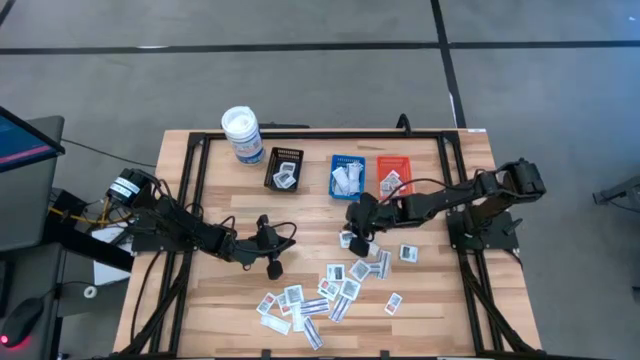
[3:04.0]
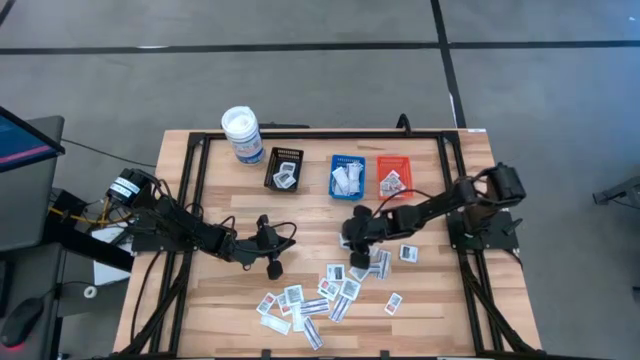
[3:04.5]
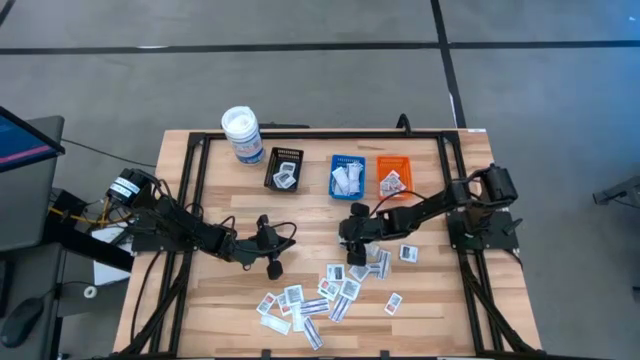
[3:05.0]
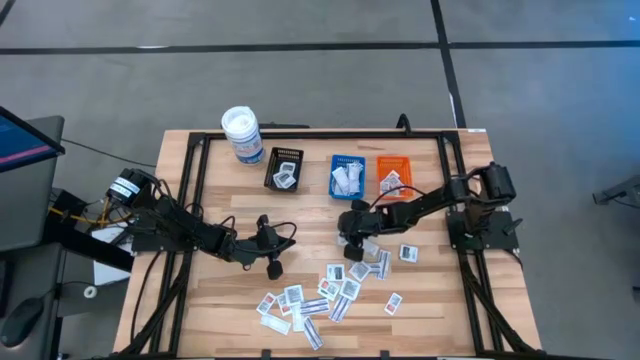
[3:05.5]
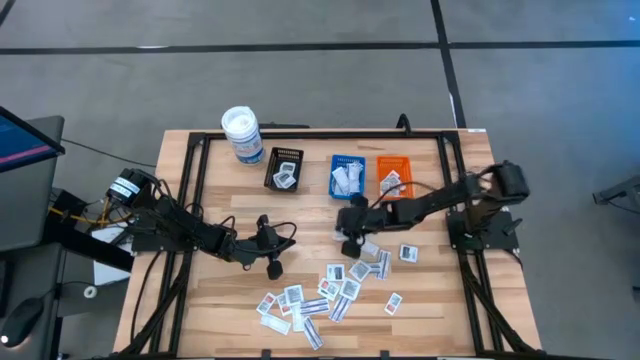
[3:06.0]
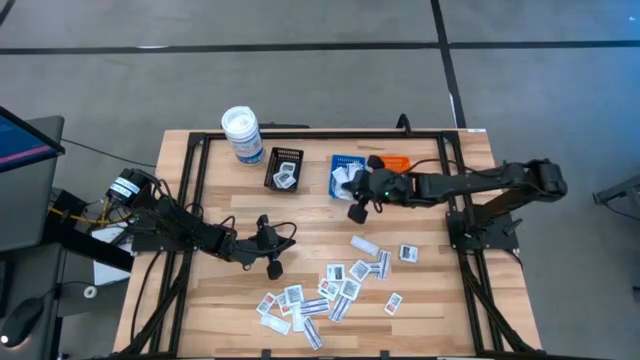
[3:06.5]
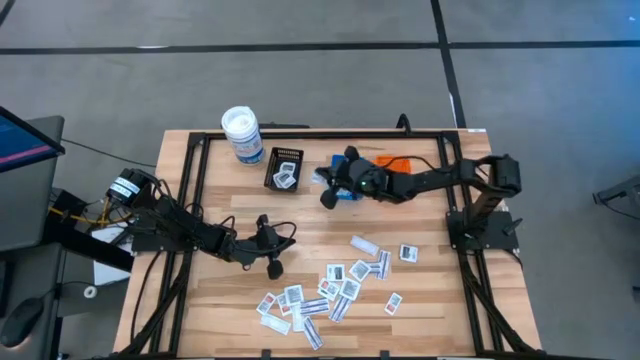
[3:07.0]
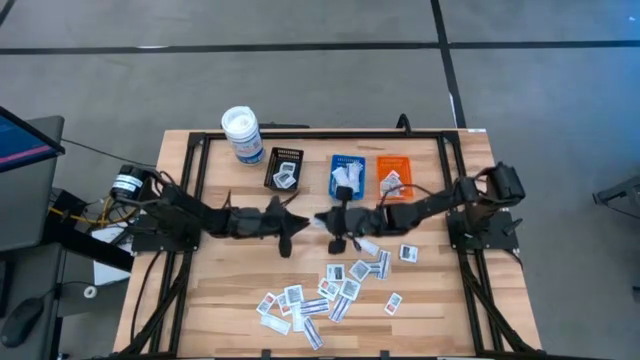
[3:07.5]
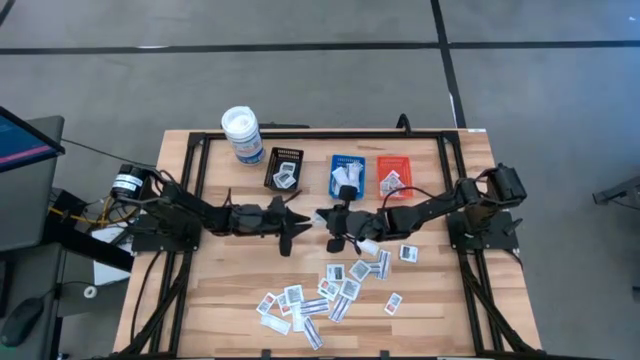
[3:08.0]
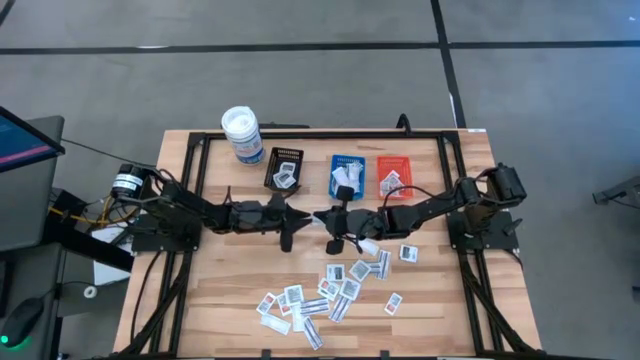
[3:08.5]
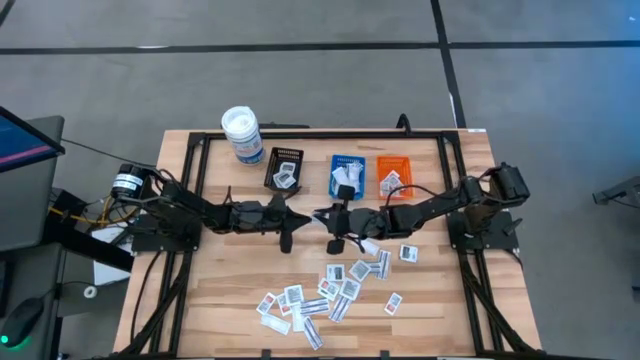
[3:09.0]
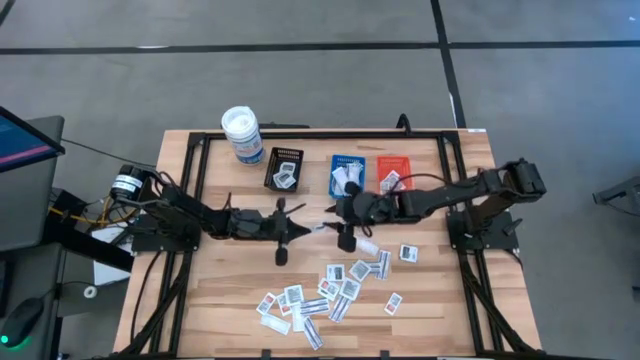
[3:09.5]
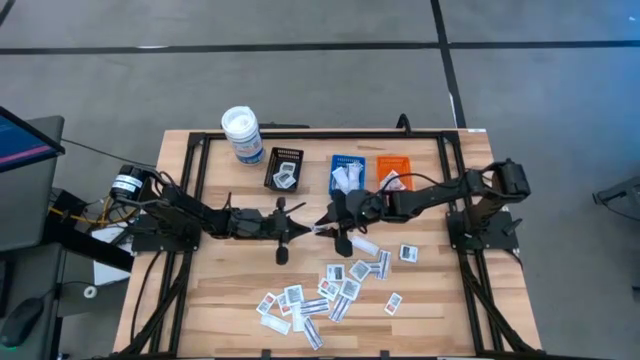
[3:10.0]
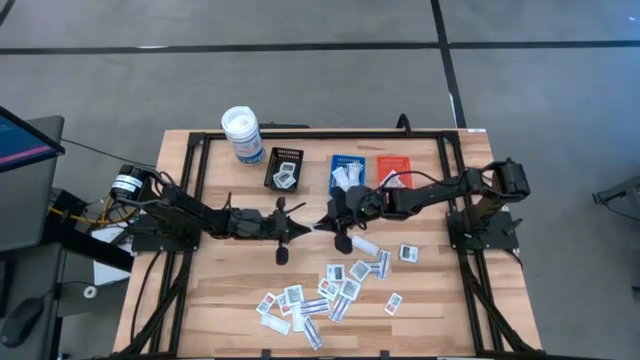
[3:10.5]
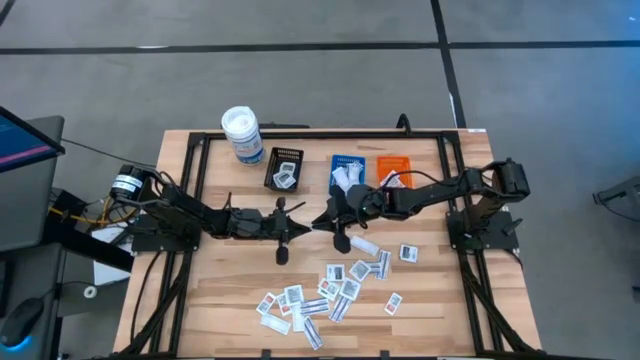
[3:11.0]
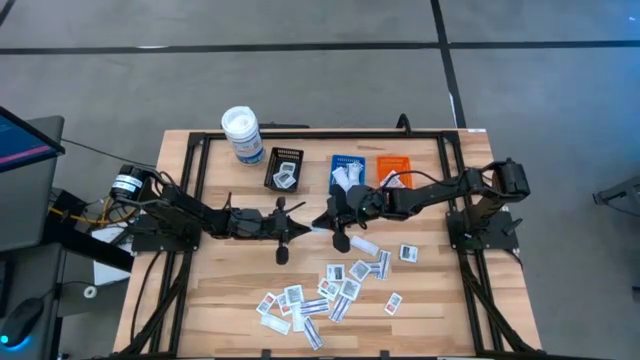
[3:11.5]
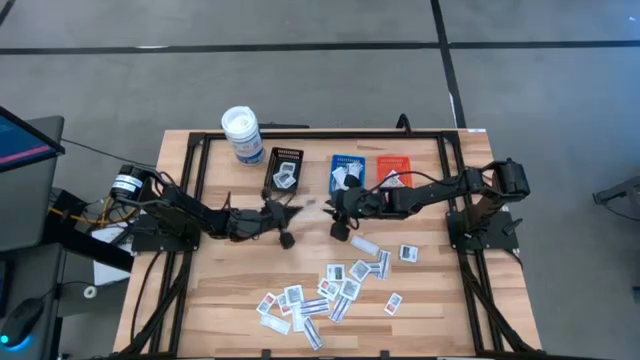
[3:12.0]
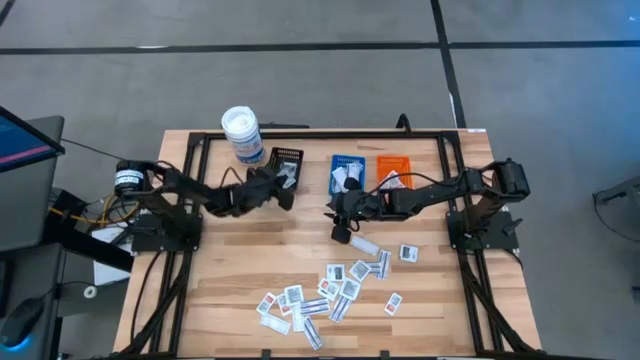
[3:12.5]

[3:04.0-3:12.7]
Task: Pick & Place First Aid Supplies
Put the black towelette pack into the black bin

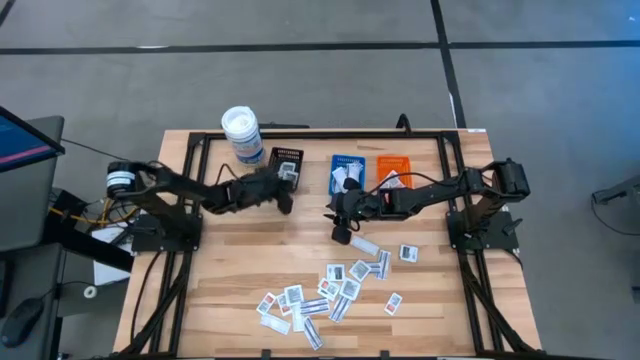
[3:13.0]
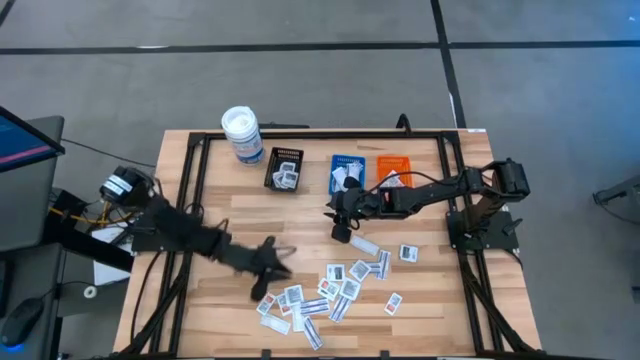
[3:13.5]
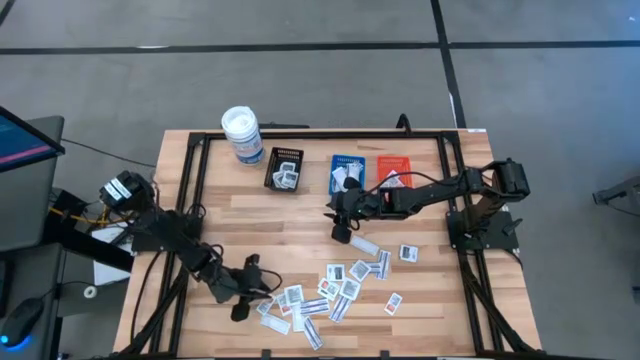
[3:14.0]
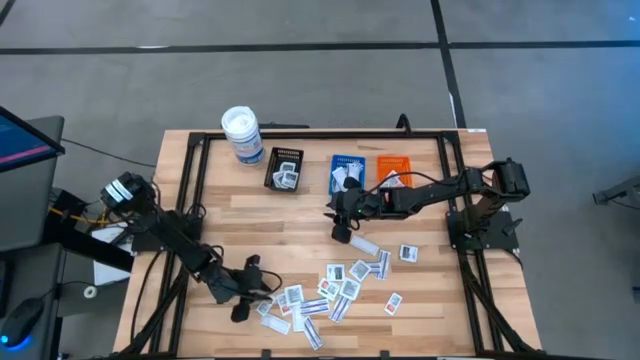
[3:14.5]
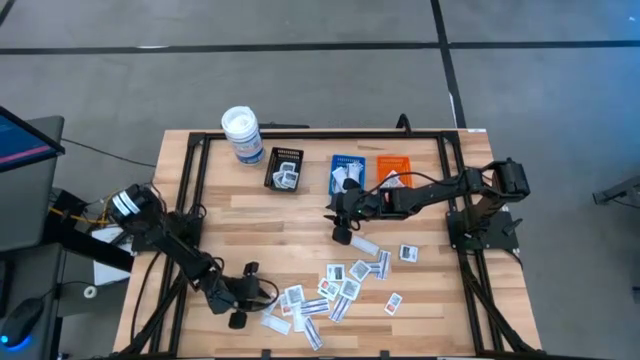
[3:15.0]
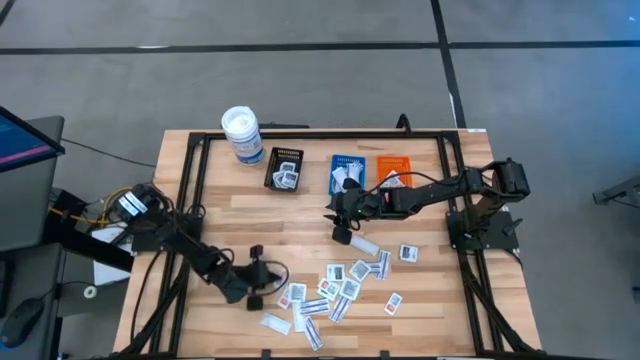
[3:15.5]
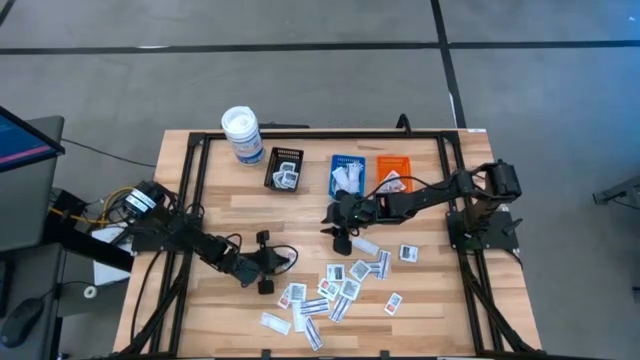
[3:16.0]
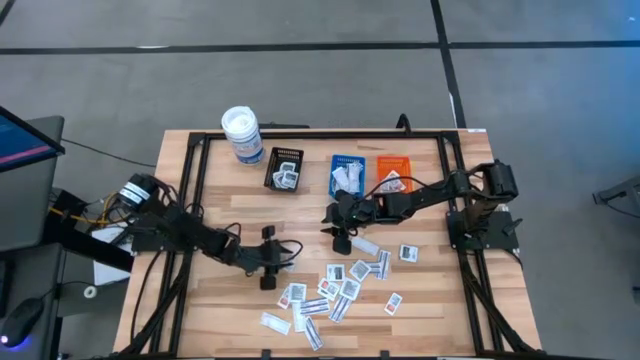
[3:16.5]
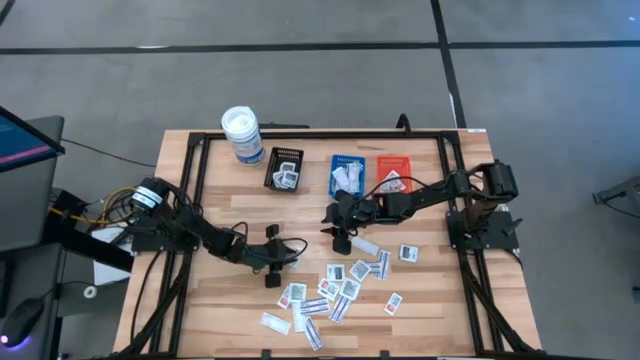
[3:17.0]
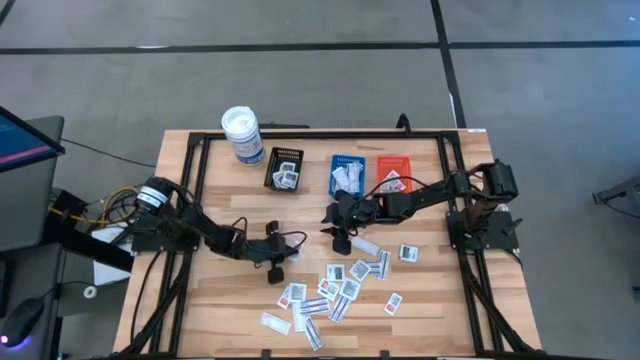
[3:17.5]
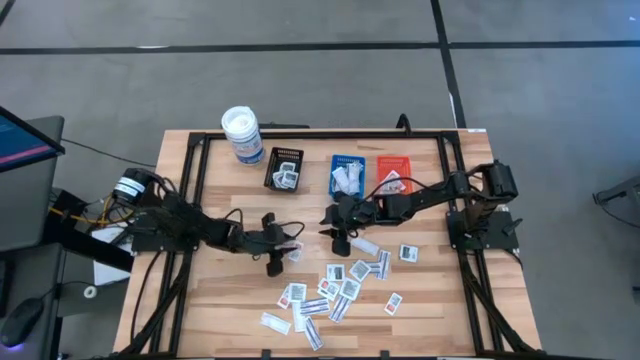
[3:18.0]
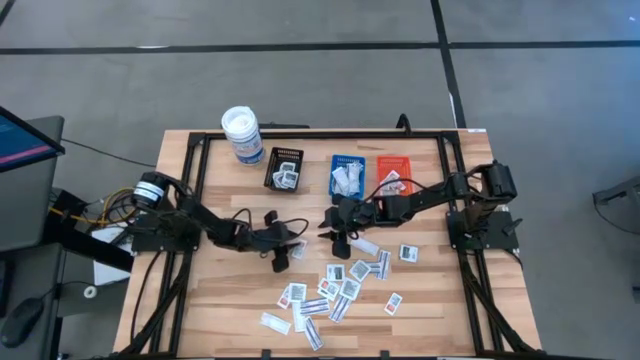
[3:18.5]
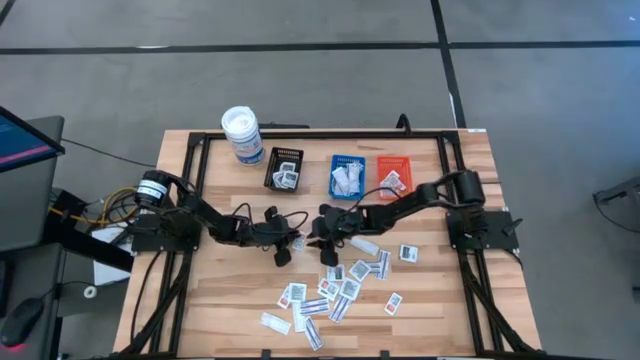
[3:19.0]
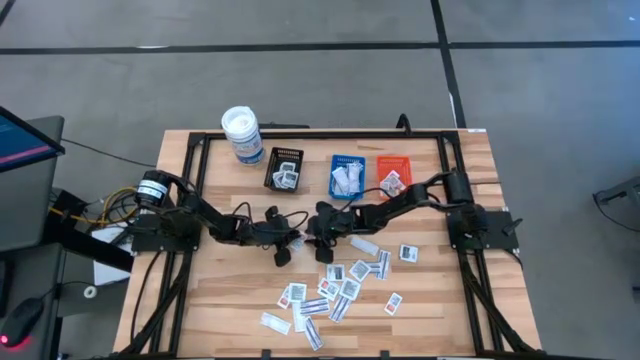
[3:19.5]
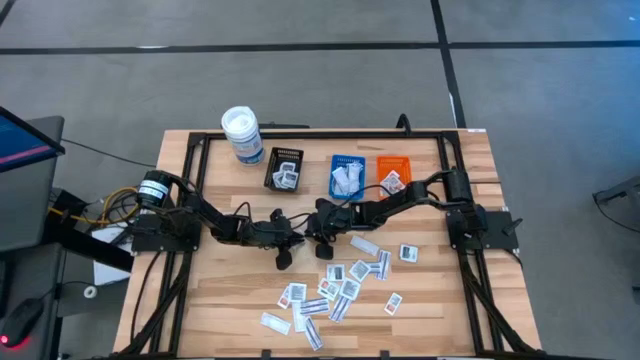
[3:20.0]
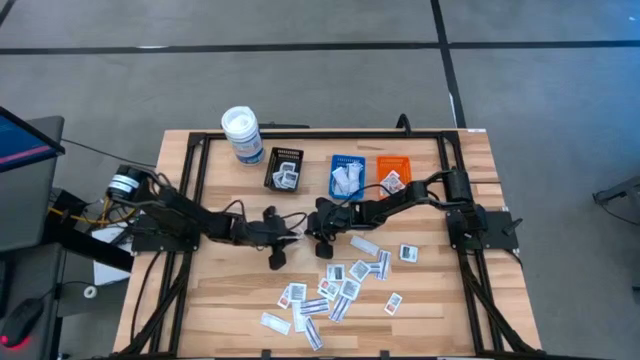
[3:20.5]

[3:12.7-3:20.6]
Put the orange ointment pack into the orange bin

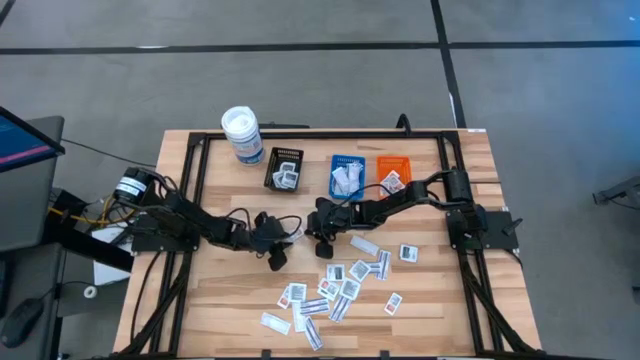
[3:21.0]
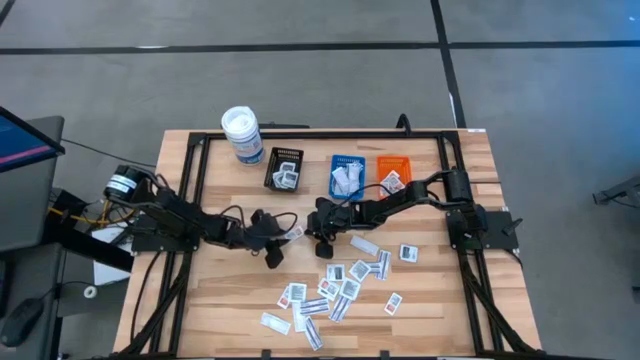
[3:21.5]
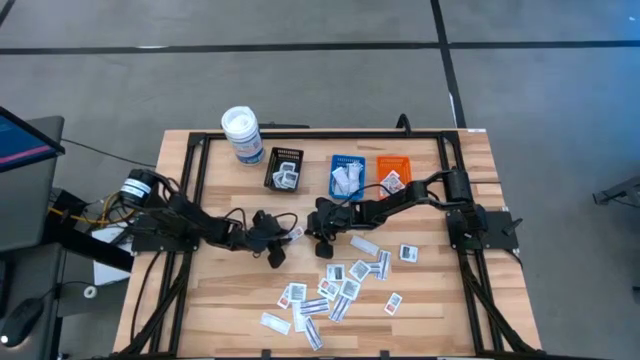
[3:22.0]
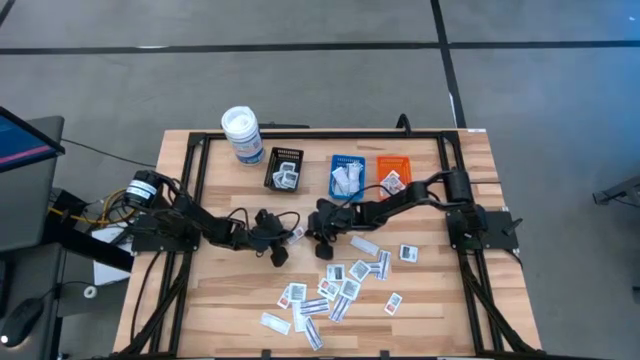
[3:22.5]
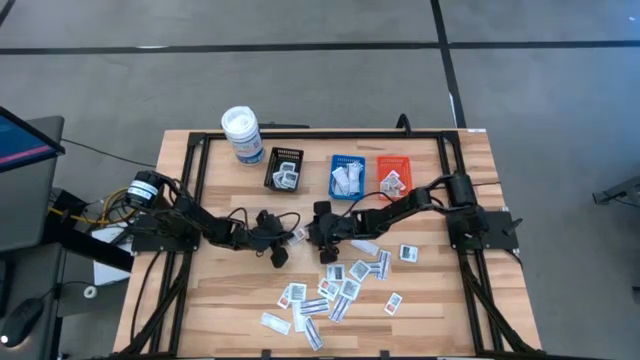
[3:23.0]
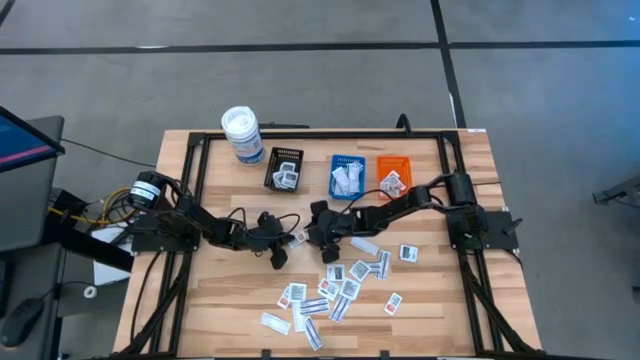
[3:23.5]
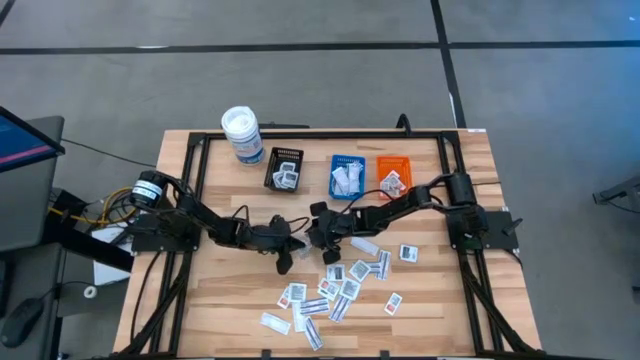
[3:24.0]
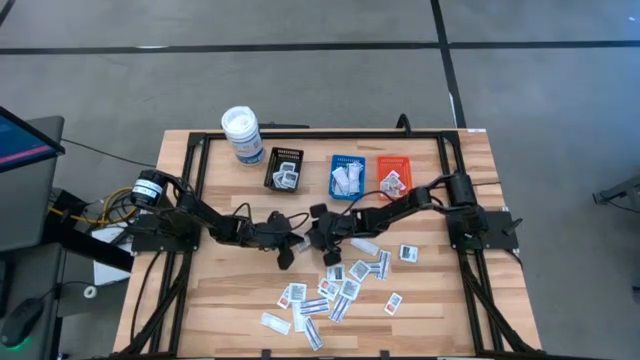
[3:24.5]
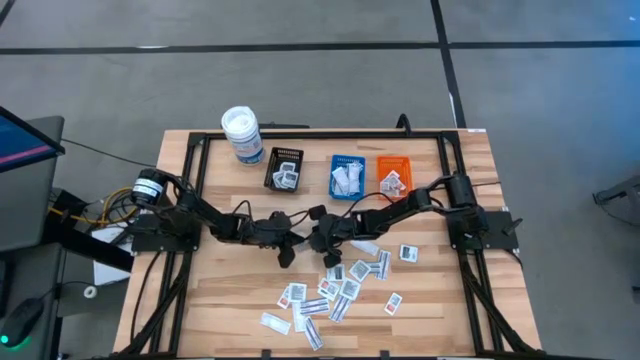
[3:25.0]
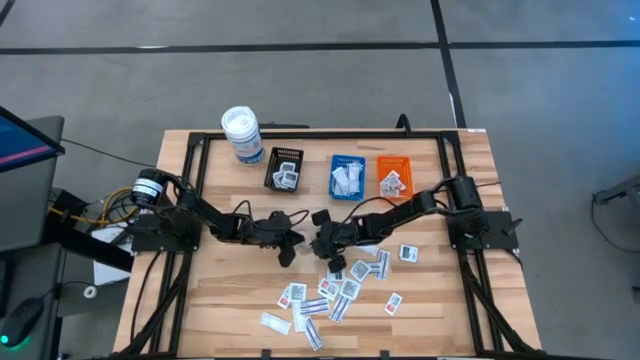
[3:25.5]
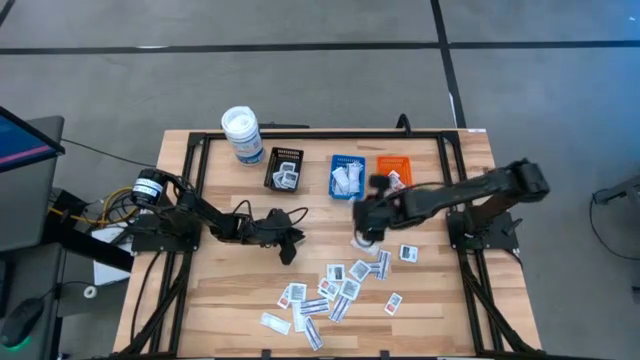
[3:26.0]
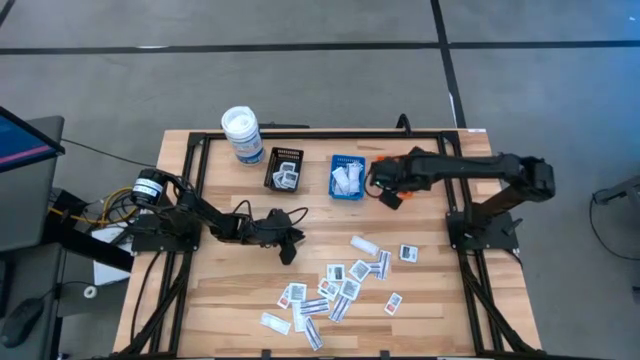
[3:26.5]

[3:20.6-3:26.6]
Put the orange ointment pack into the orange bin
